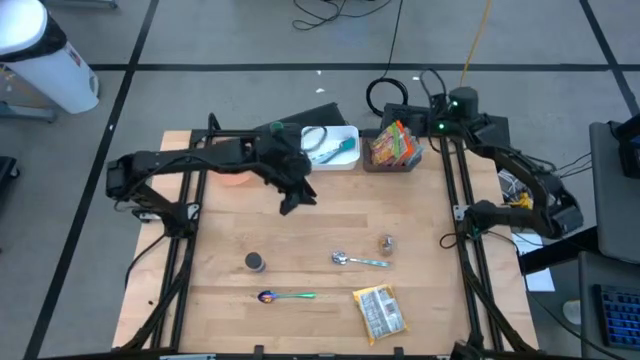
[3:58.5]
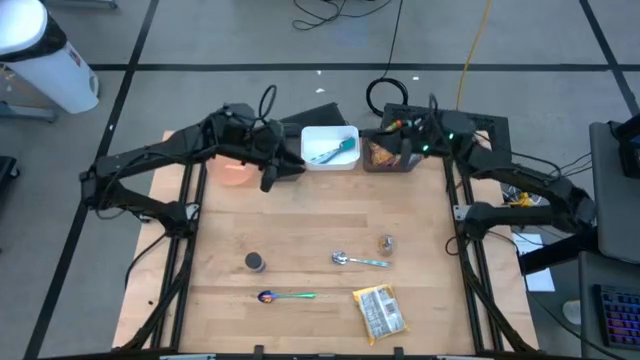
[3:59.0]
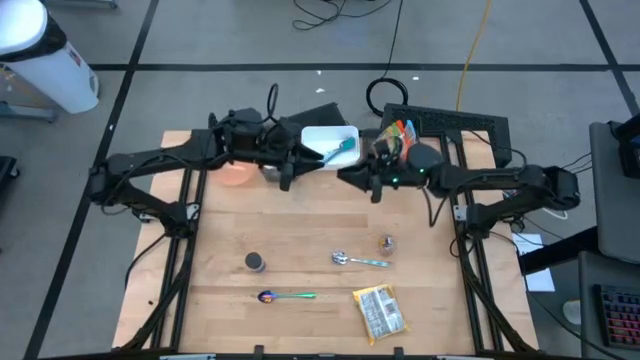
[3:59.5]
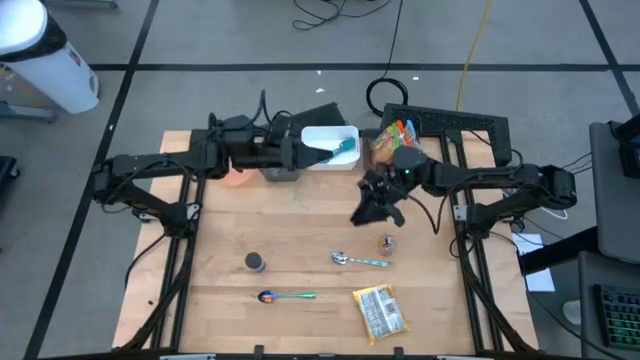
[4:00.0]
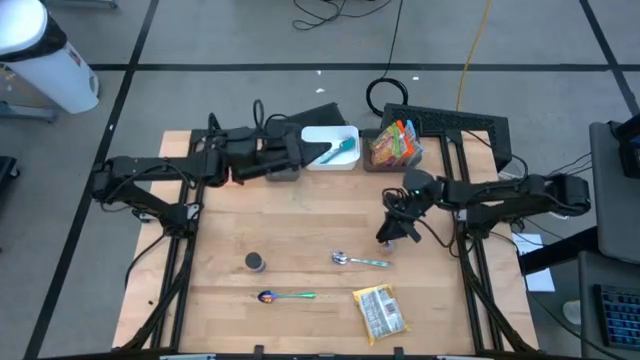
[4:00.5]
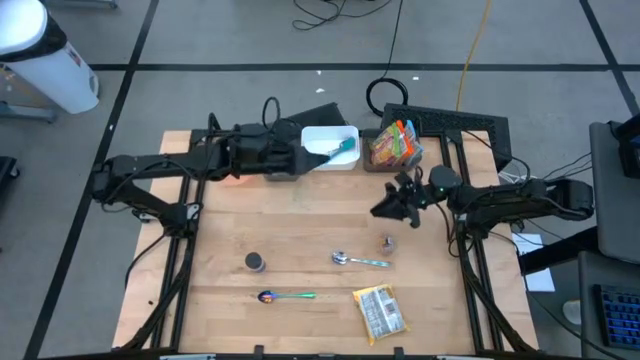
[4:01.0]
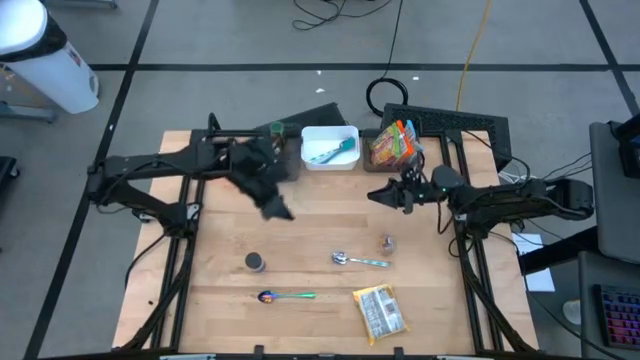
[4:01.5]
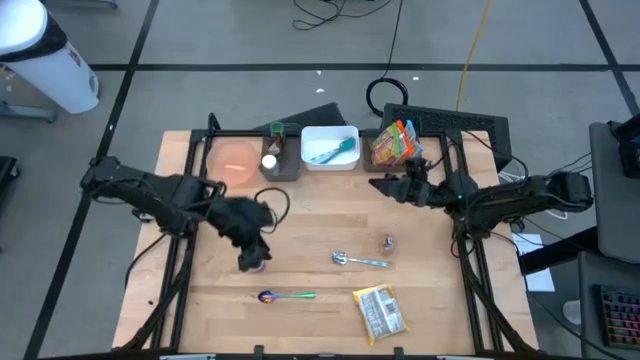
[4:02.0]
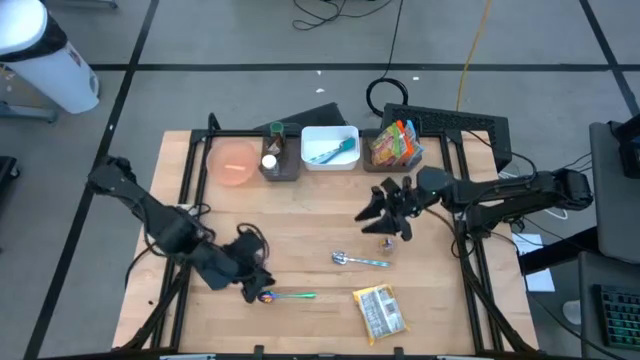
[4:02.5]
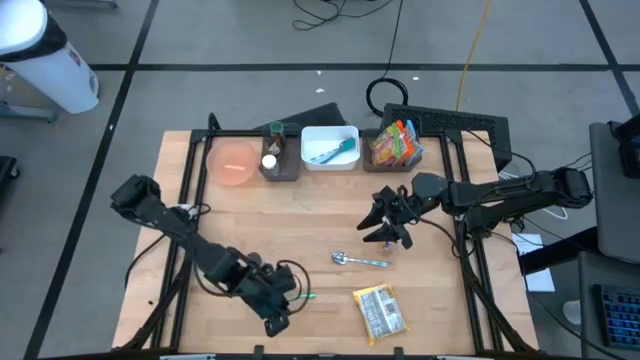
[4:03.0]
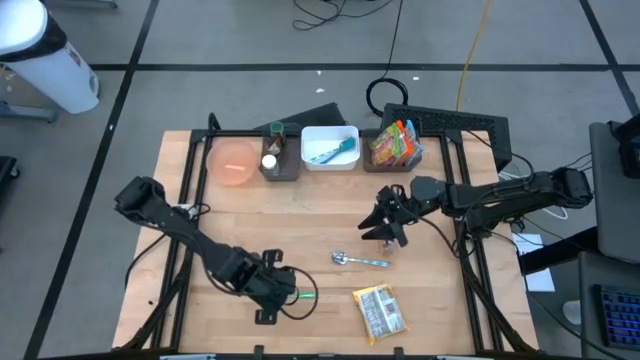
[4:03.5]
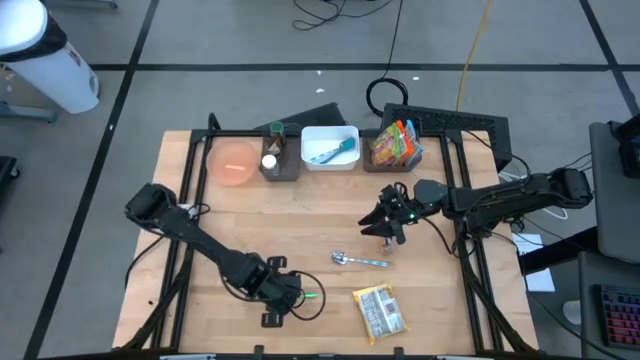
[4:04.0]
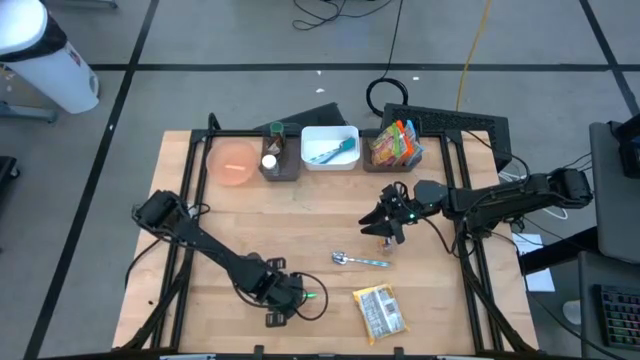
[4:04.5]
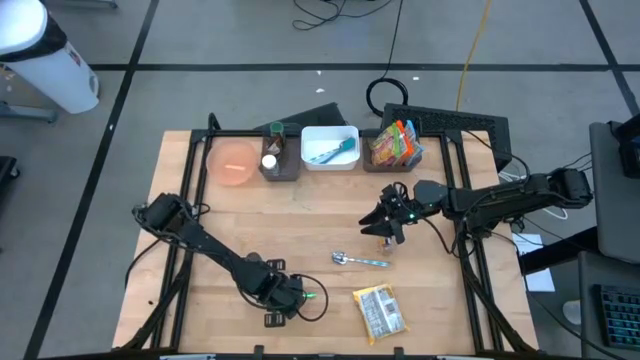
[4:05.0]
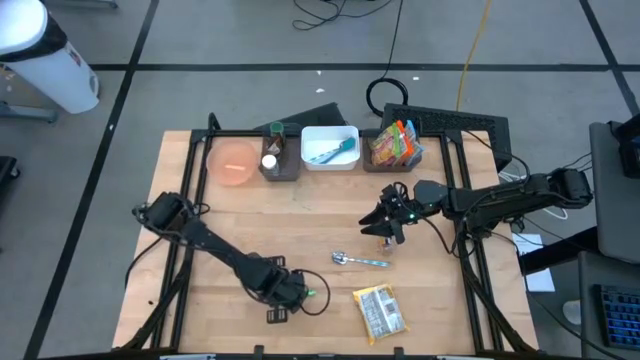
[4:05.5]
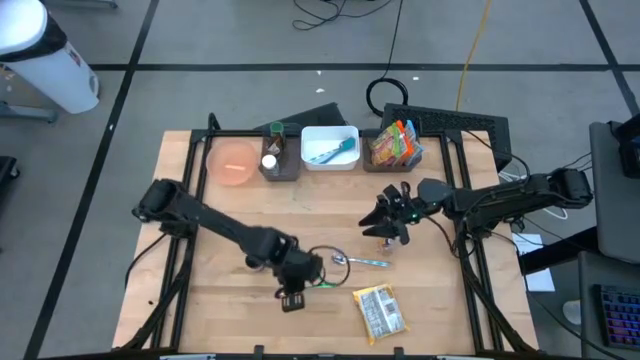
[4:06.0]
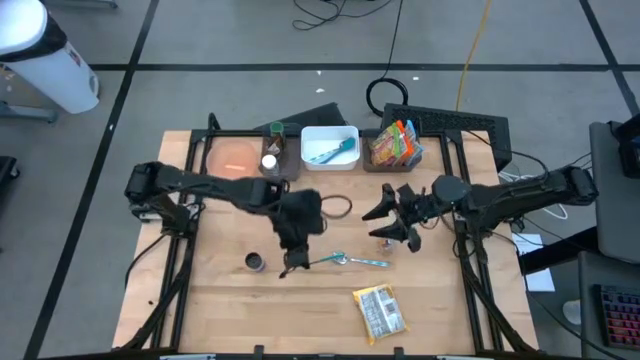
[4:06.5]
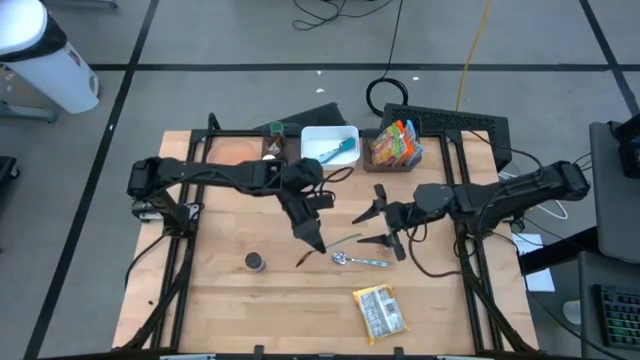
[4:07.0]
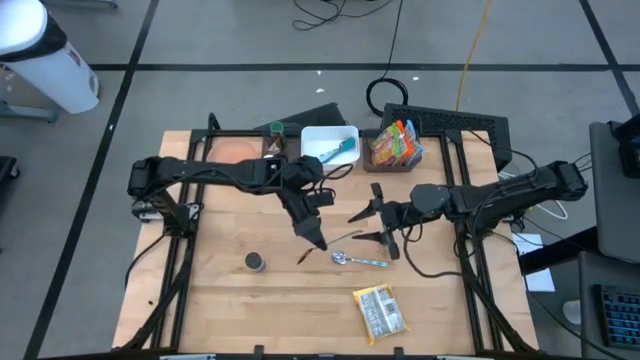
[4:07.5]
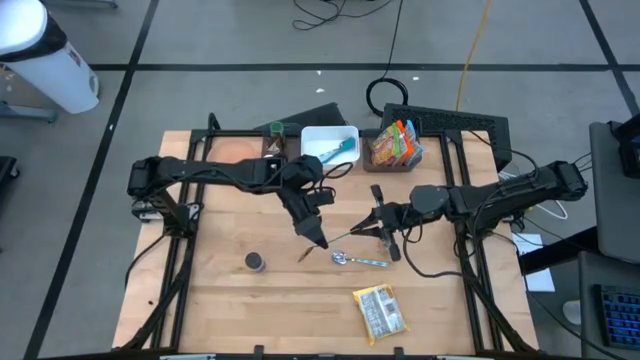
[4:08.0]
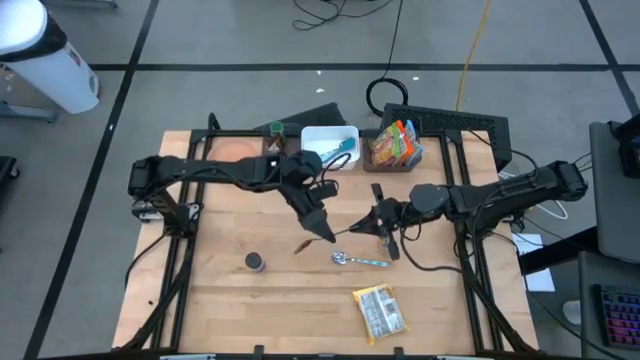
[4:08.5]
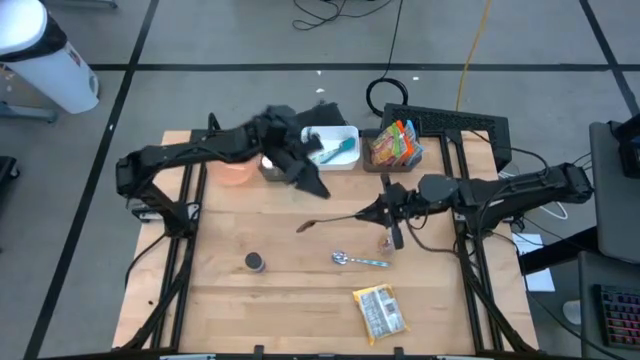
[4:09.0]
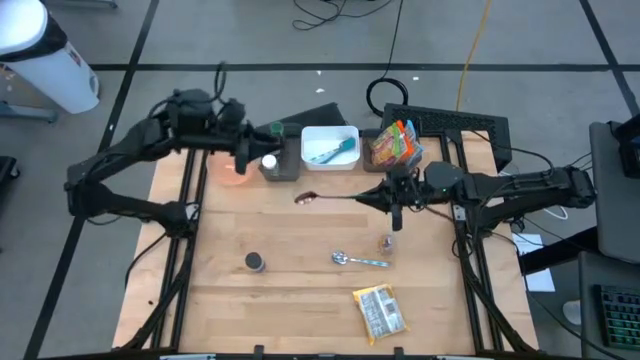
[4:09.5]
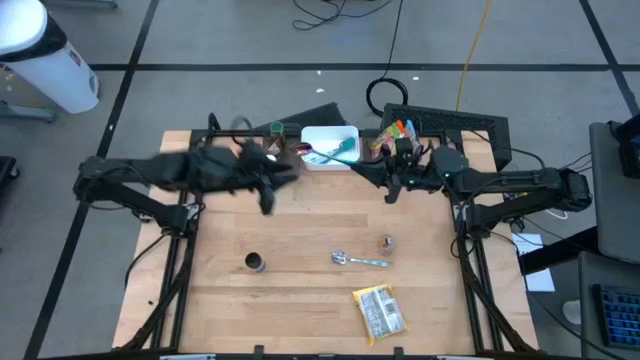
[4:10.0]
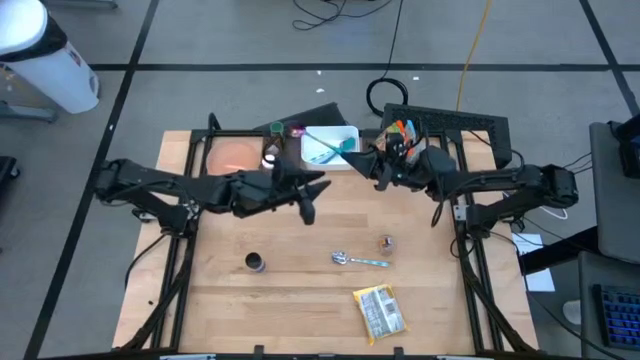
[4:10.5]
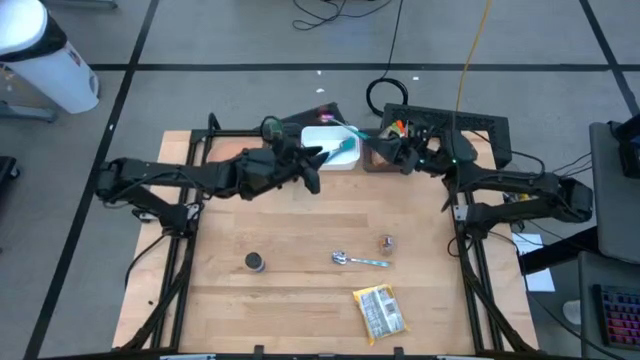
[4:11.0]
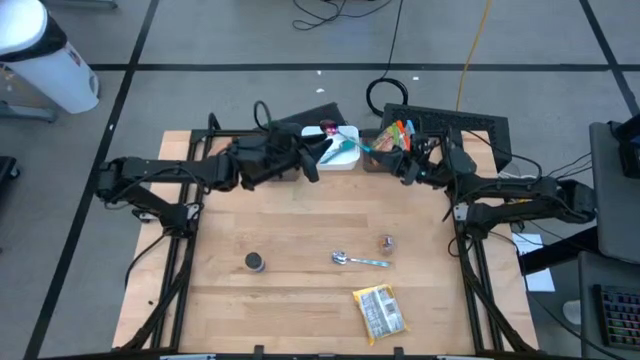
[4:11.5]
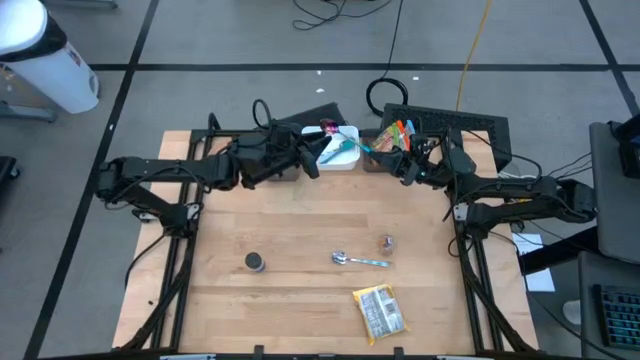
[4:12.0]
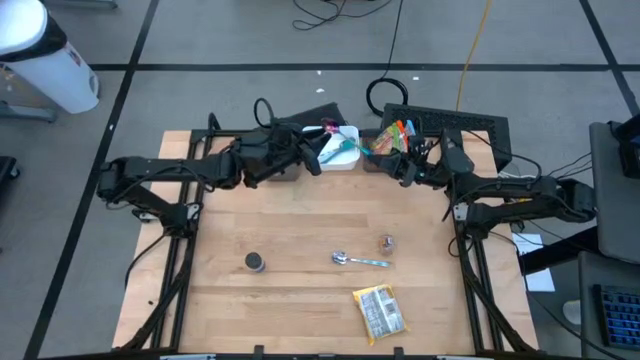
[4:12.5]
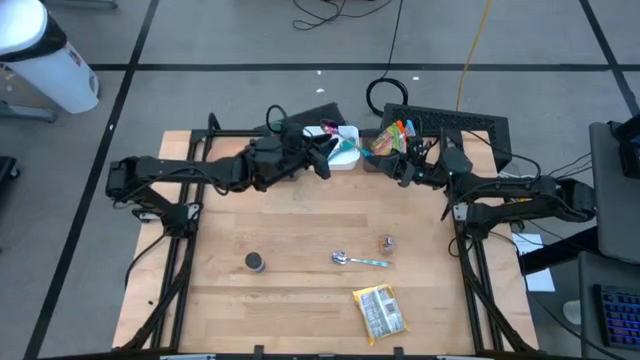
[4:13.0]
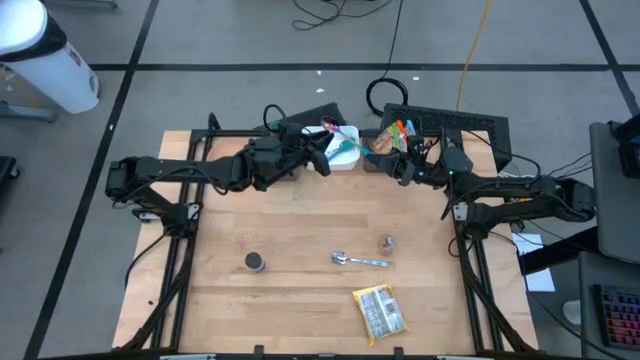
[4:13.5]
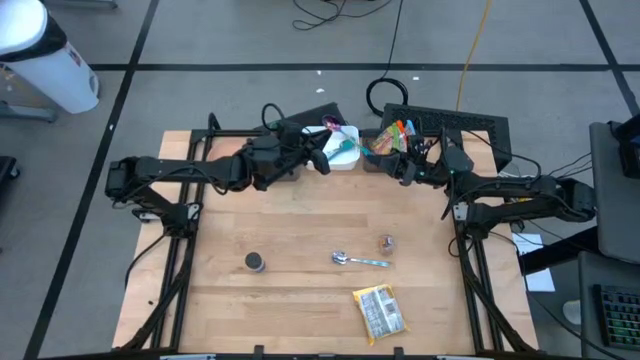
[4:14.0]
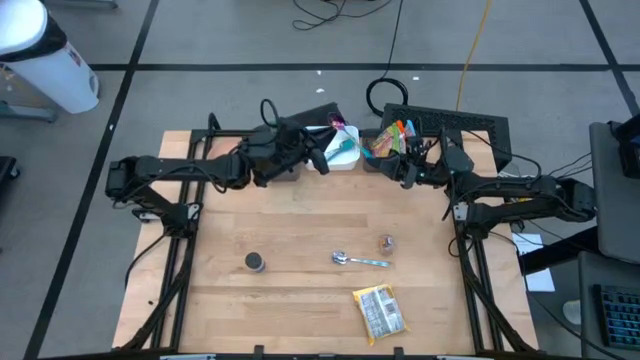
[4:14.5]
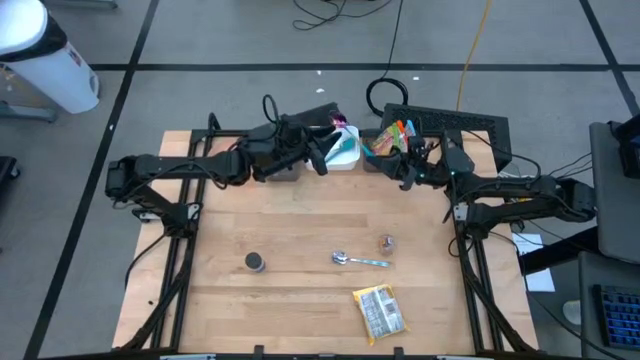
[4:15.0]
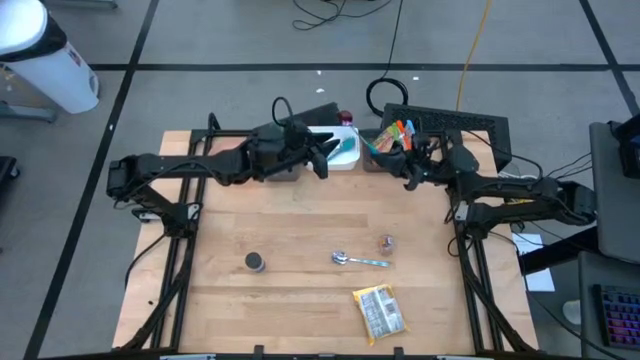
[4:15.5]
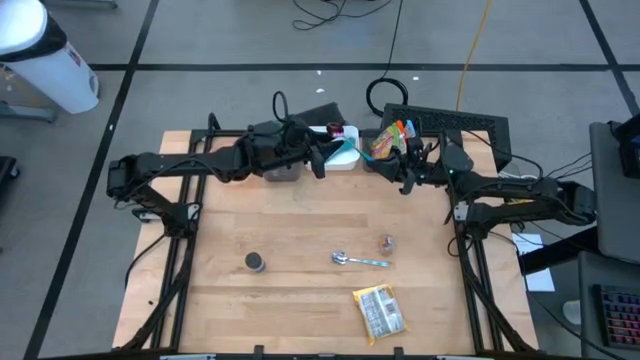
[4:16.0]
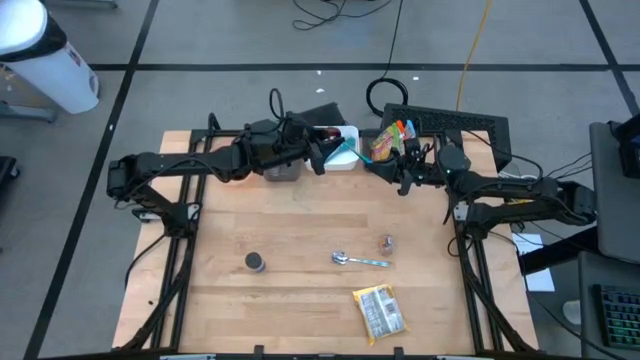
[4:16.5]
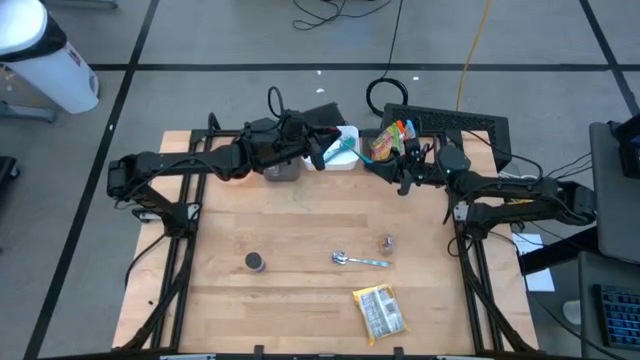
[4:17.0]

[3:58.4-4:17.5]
Task: Pick & Place Food Item
Put the purple spoon into the white bin
